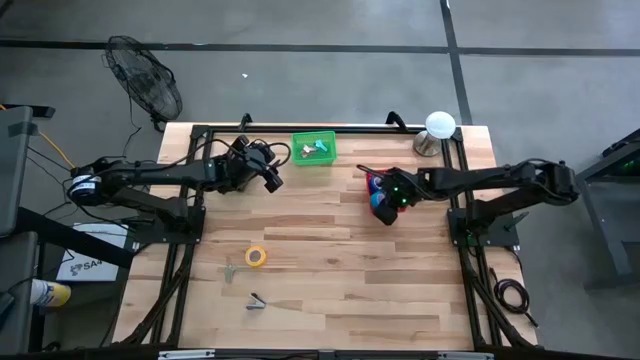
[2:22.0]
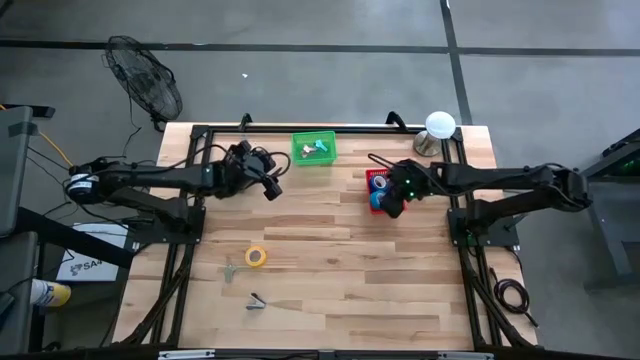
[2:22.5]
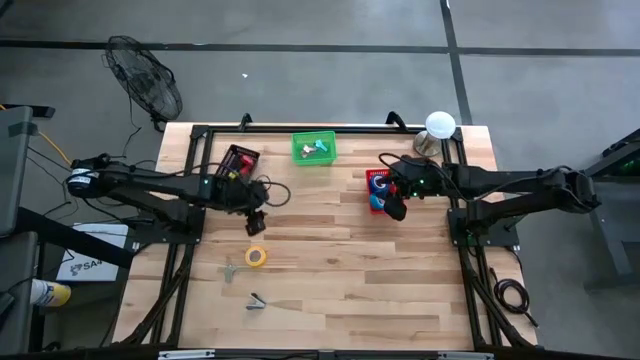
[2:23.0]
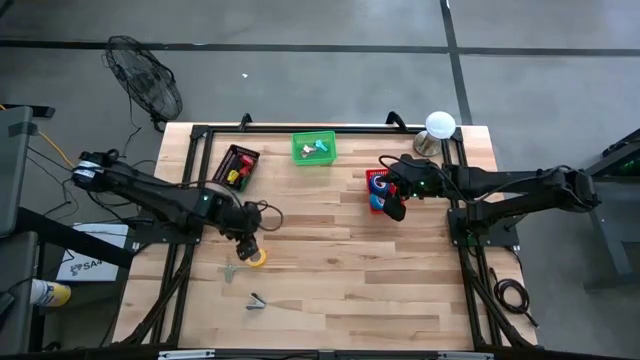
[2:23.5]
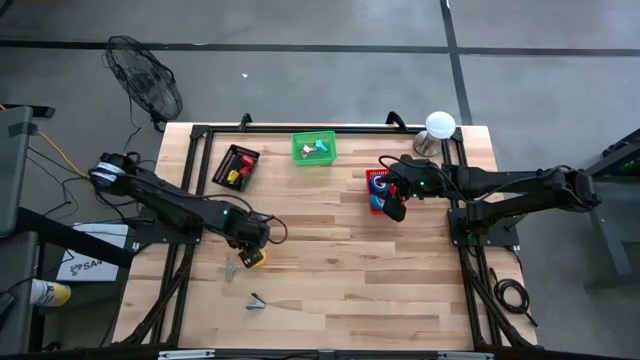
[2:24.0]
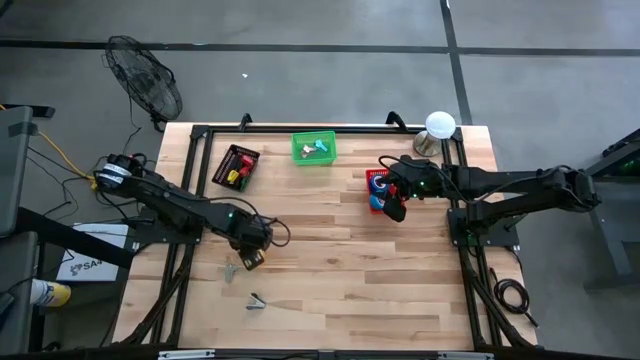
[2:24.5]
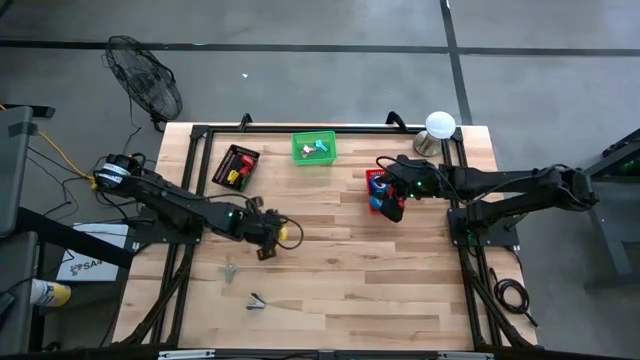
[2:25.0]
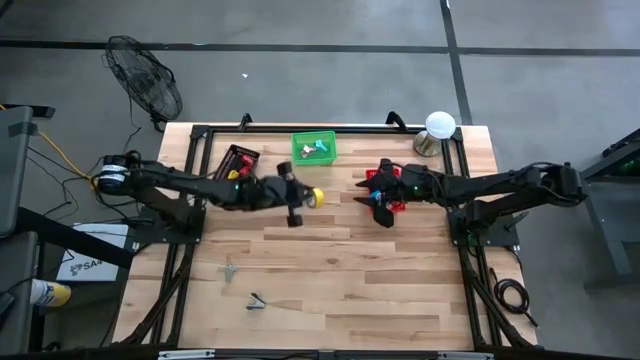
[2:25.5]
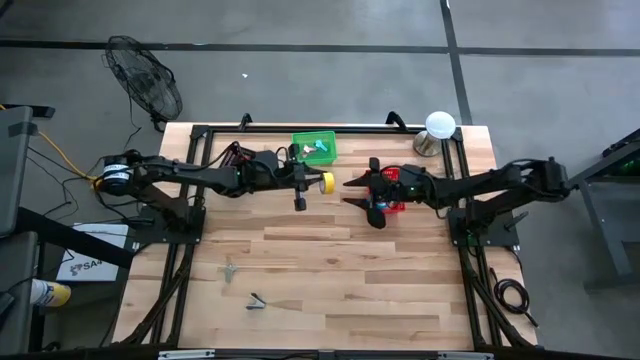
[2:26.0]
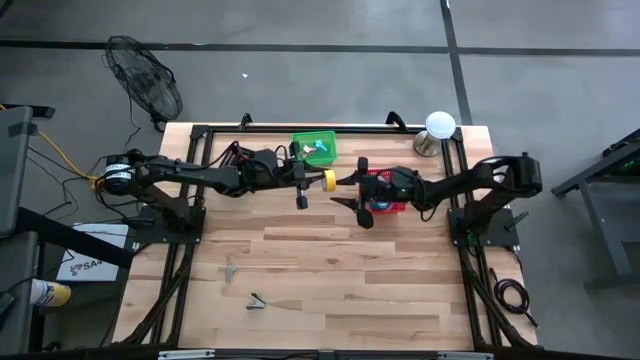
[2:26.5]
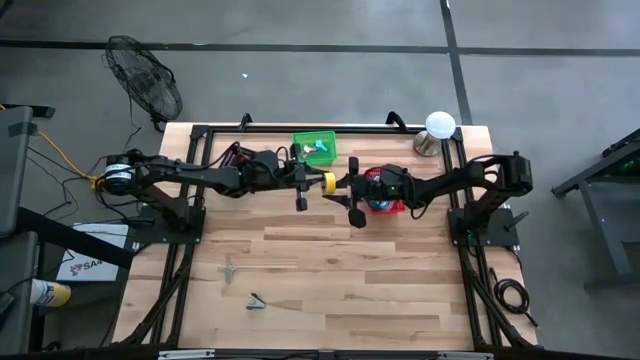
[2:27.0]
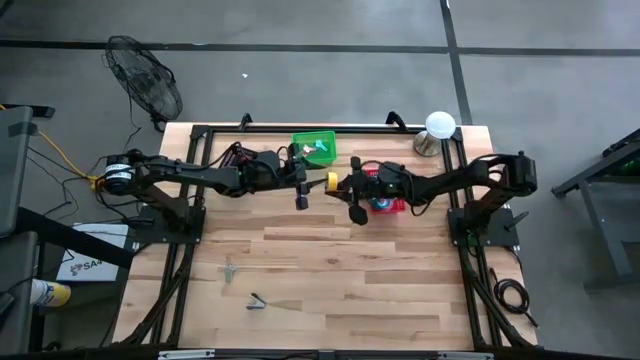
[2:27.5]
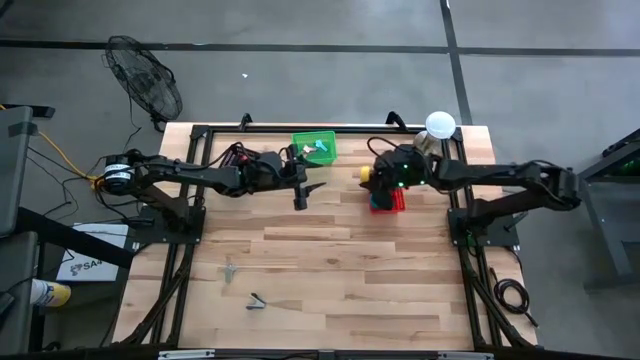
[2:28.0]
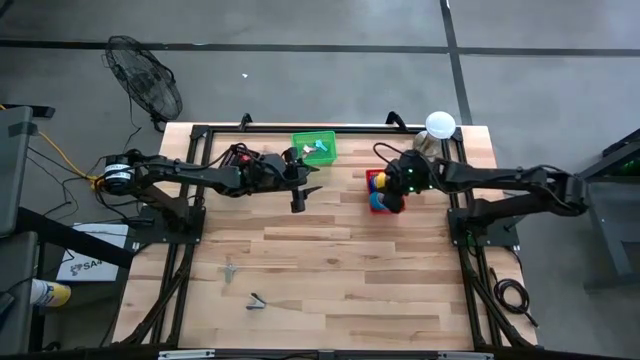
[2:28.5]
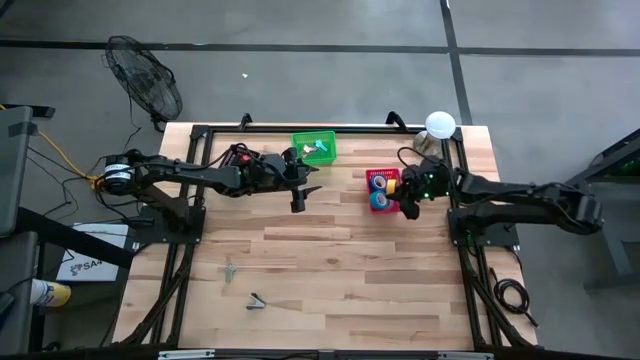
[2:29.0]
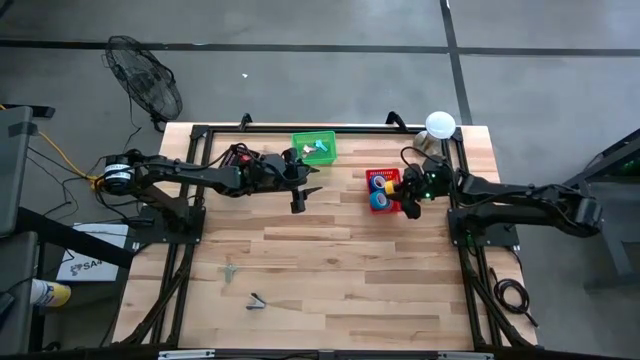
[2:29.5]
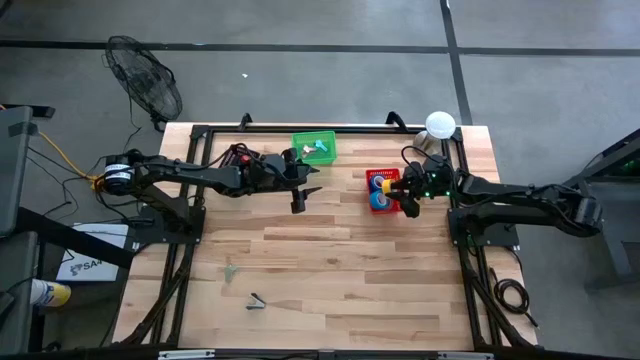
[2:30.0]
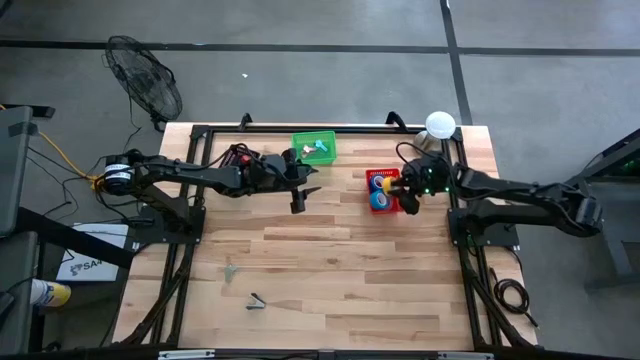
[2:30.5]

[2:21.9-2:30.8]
Task: Pick and place Stapler, Stapler remover, tape
Put the yellow tape into the red bin

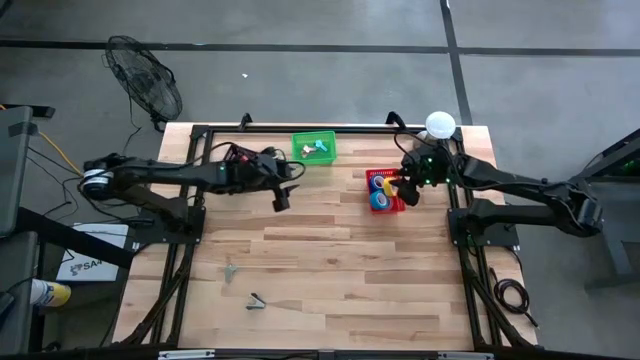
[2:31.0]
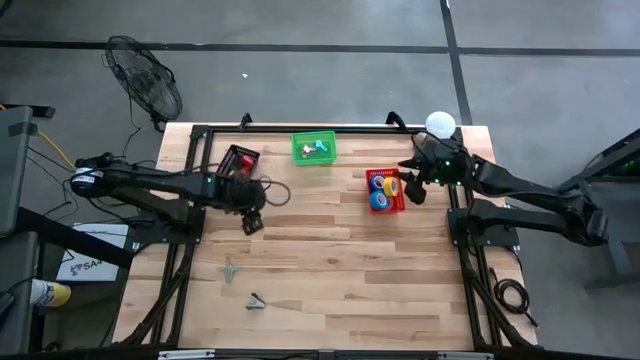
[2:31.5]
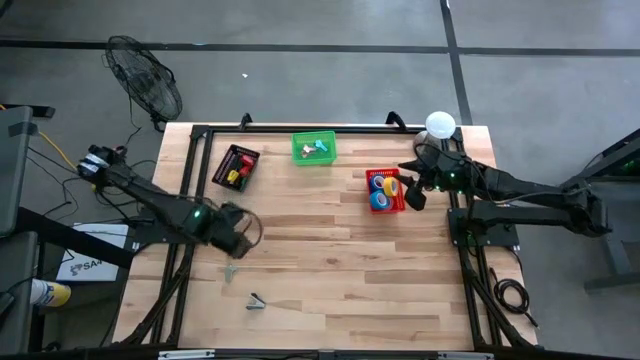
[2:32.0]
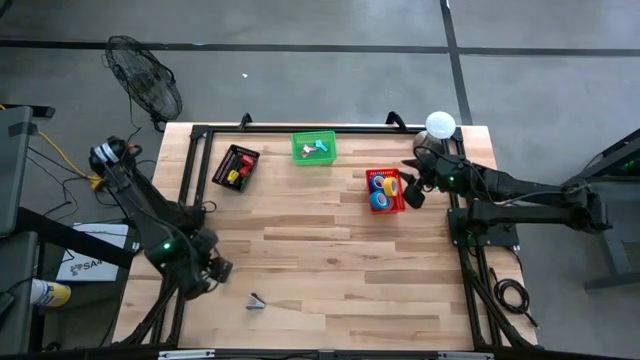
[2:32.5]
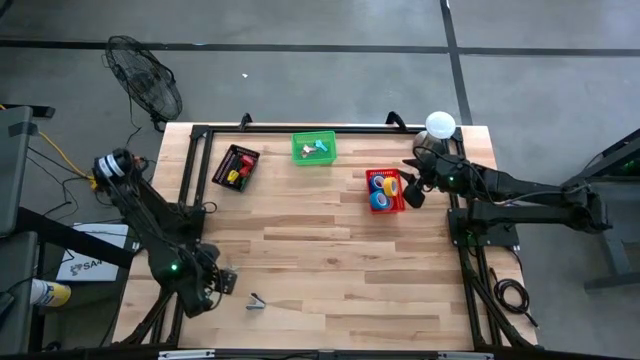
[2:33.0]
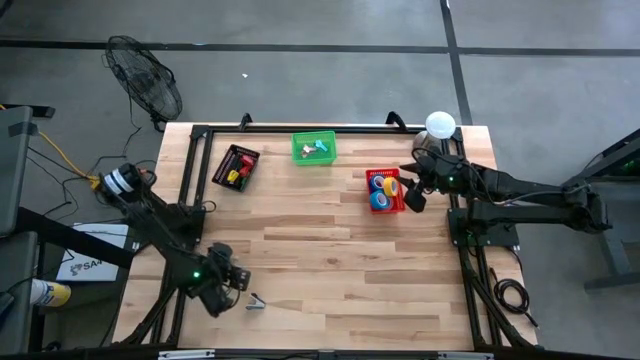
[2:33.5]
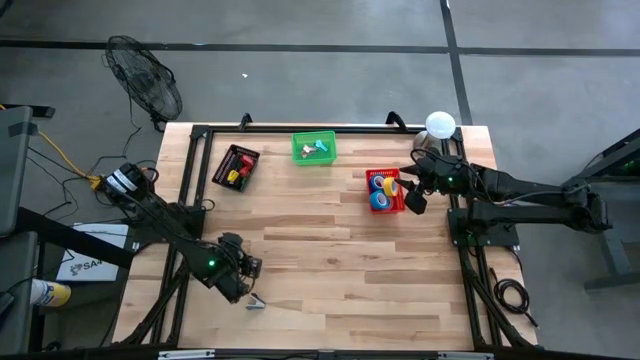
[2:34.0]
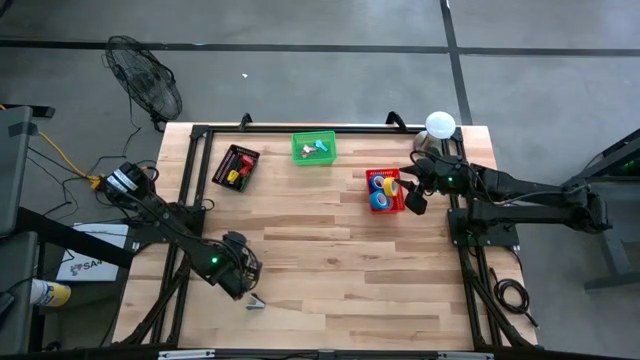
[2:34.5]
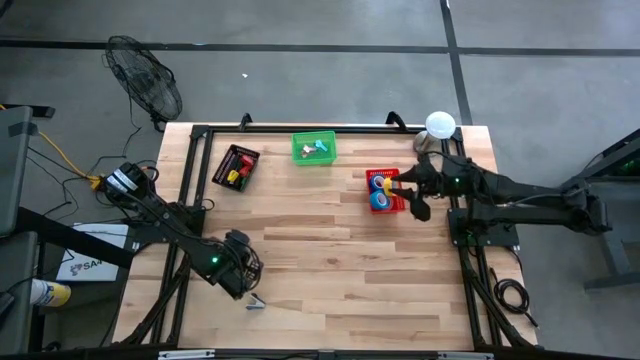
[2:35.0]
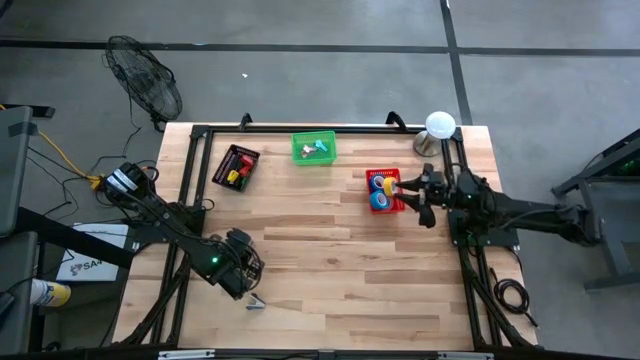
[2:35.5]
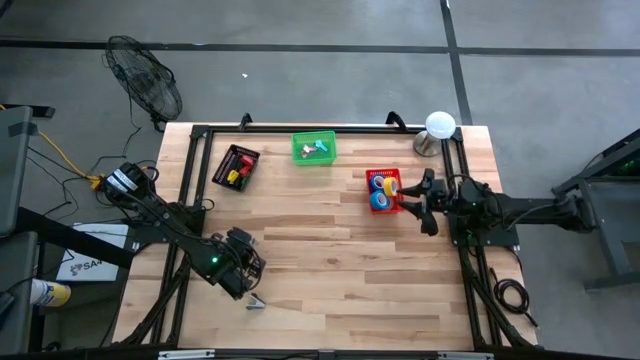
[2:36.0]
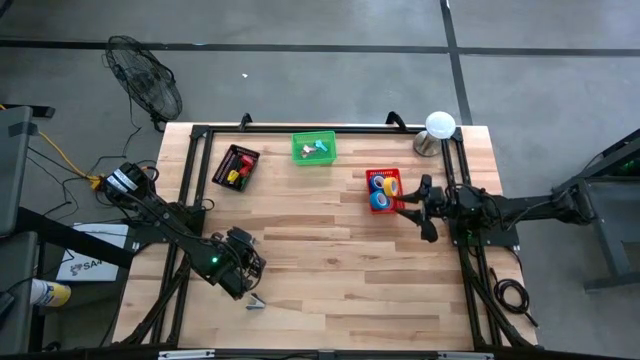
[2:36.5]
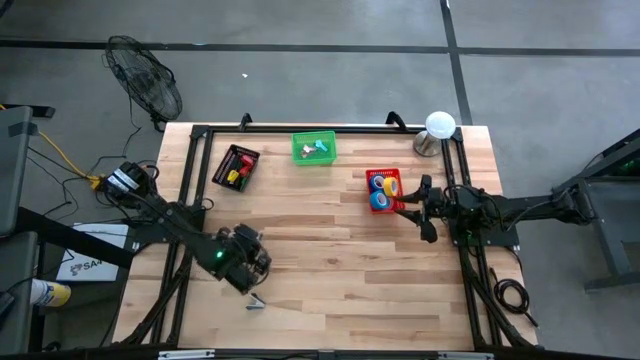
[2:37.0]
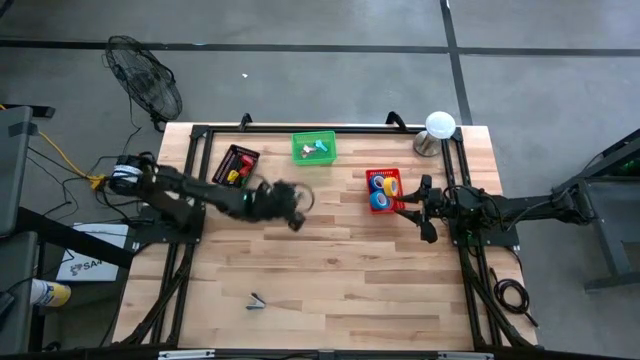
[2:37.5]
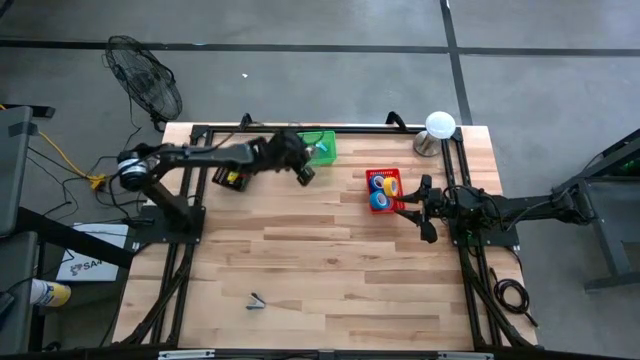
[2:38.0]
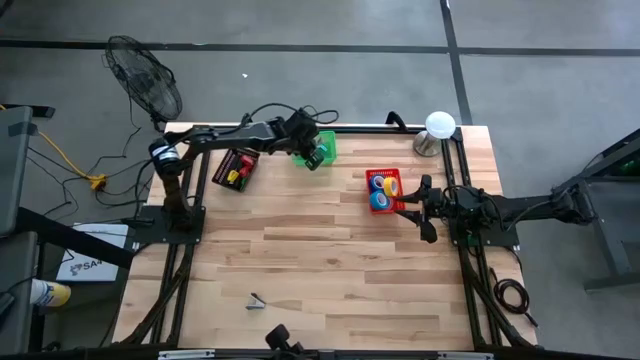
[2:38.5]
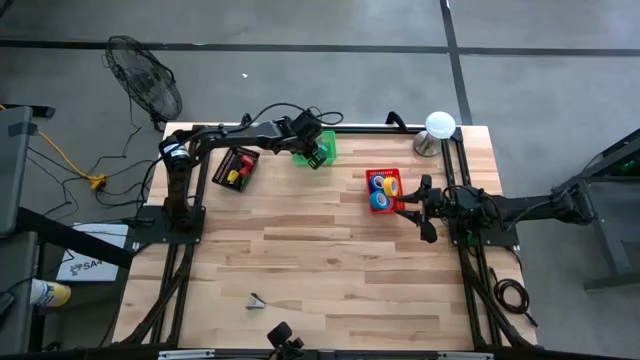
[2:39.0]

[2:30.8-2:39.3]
Put the gray staple remover into the green bin

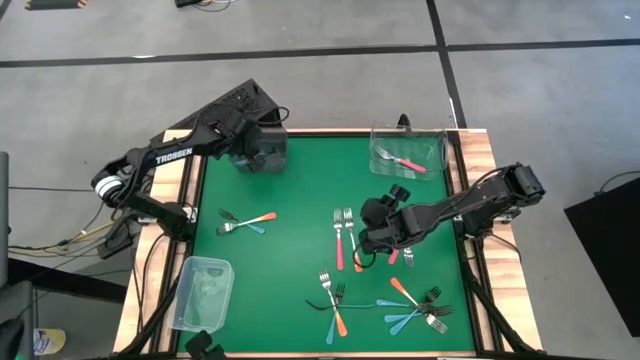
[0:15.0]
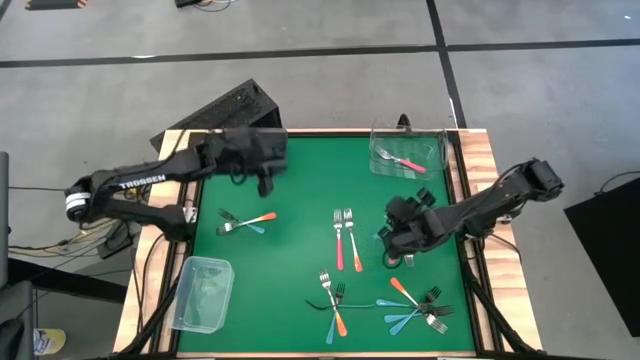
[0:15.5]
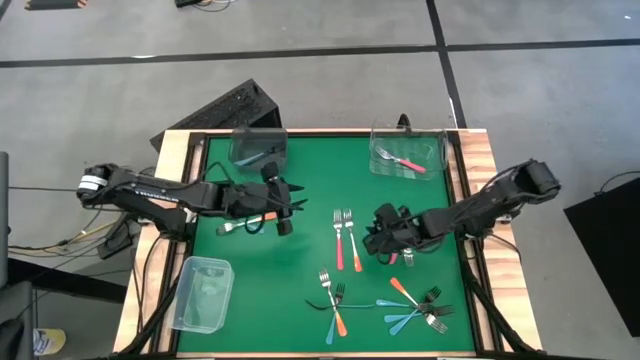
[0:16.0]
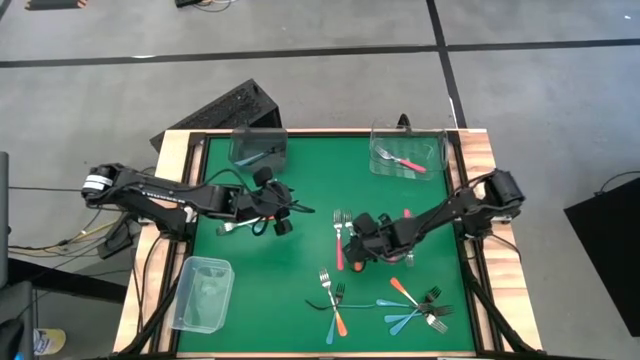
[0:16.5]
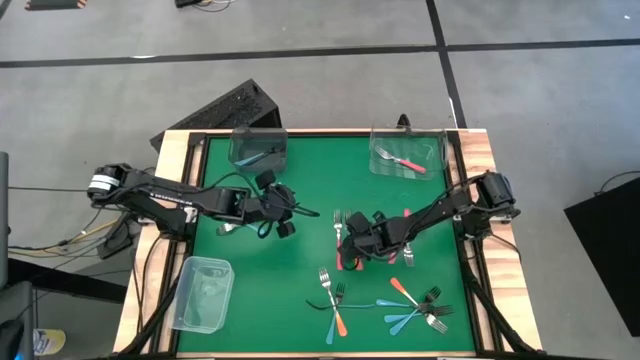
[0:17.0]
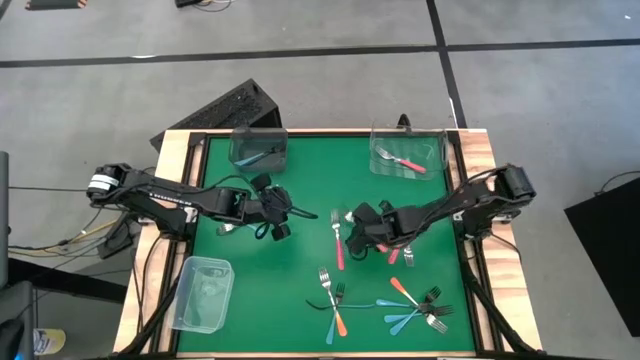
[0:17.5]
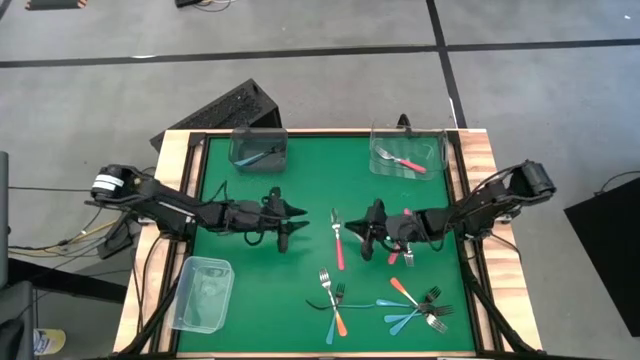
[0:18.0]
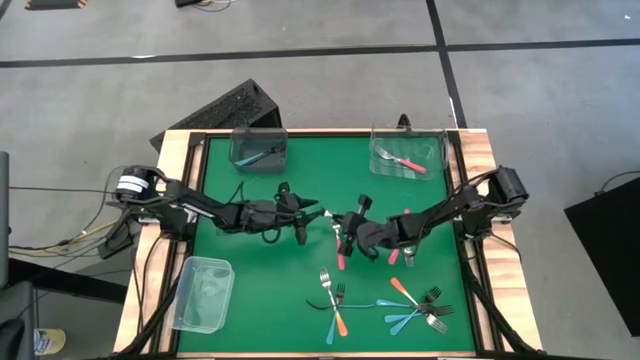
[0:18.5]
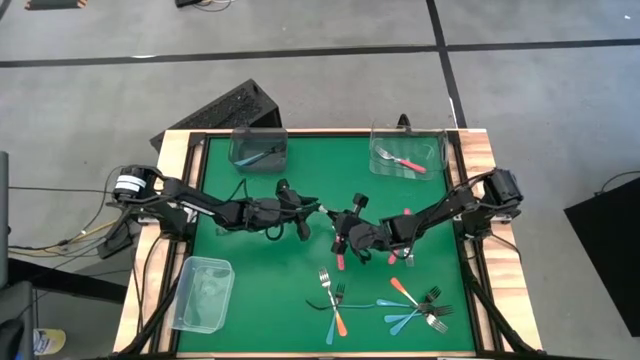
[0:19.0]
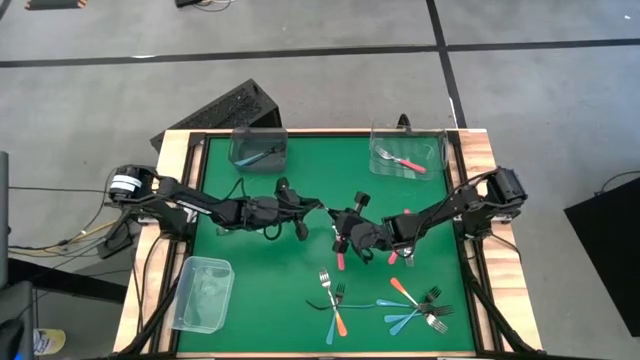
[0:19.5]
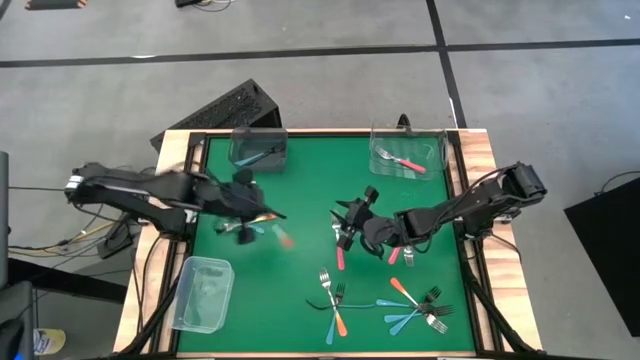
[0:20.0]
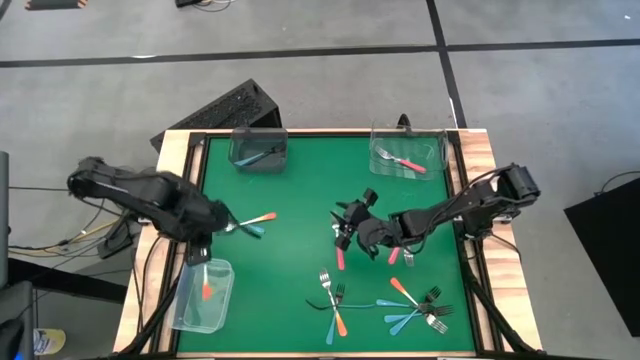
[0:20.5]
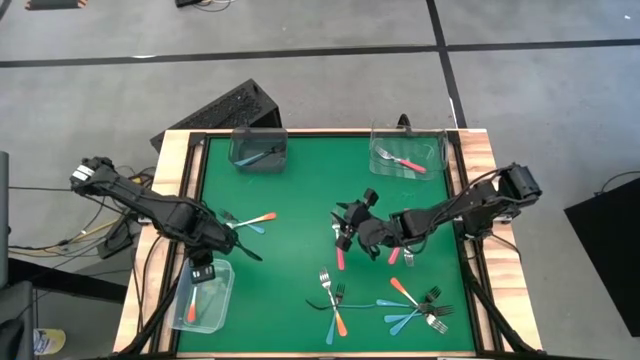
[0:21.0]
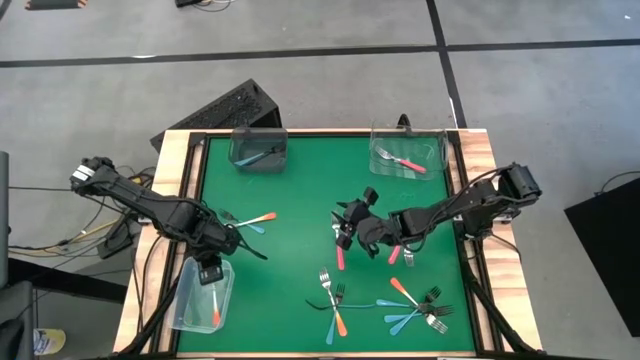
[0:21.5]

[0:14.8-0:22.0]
Task: Sort silverware by color (type)
Put the orange fork into the white bin
